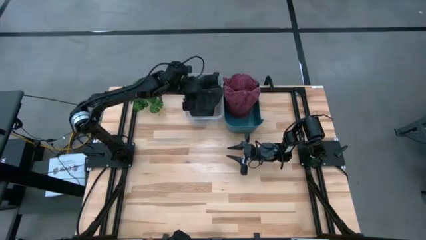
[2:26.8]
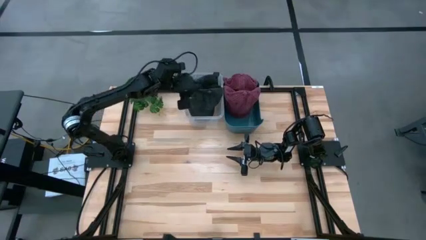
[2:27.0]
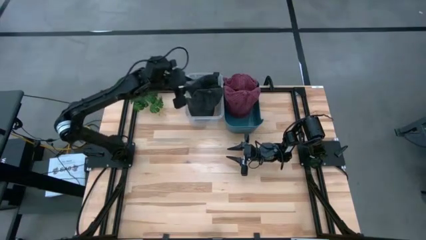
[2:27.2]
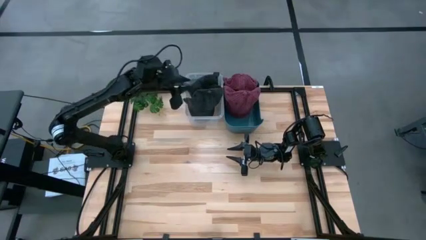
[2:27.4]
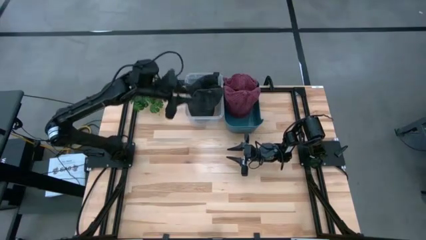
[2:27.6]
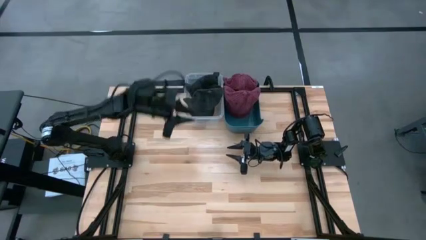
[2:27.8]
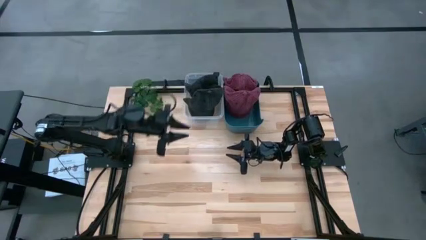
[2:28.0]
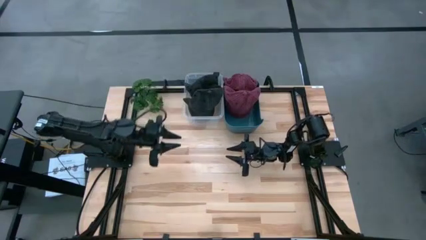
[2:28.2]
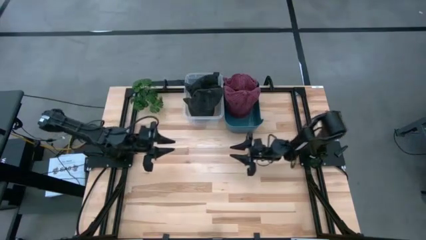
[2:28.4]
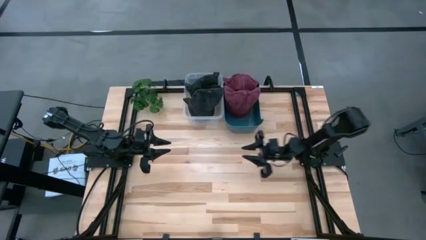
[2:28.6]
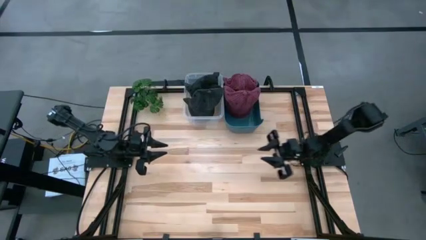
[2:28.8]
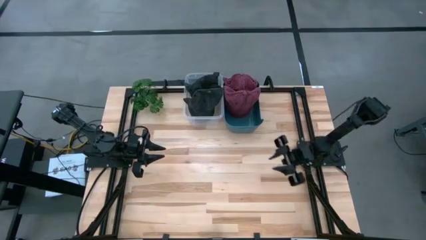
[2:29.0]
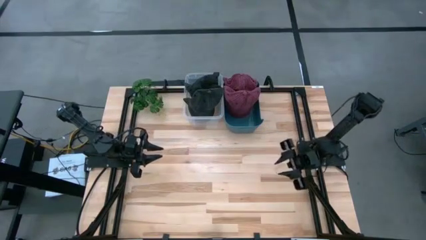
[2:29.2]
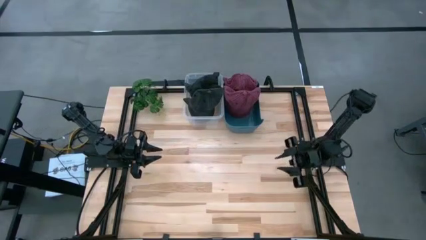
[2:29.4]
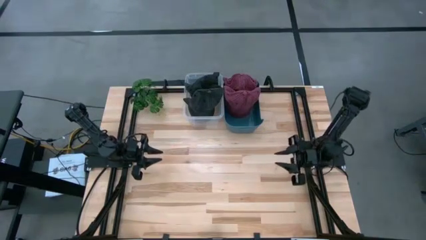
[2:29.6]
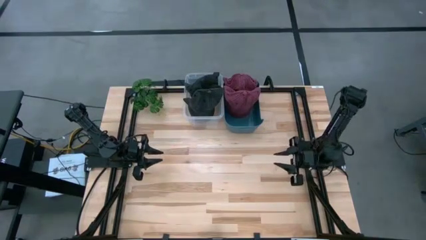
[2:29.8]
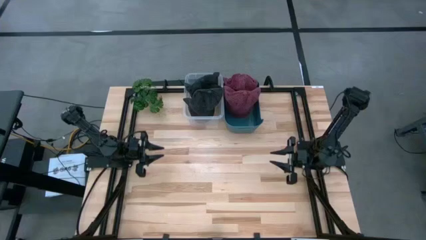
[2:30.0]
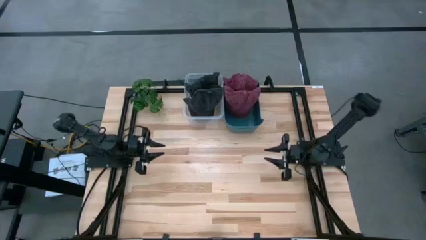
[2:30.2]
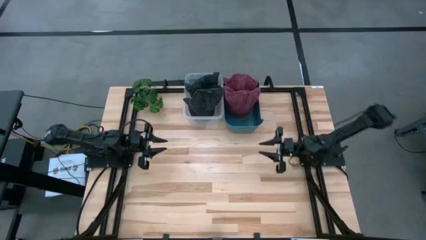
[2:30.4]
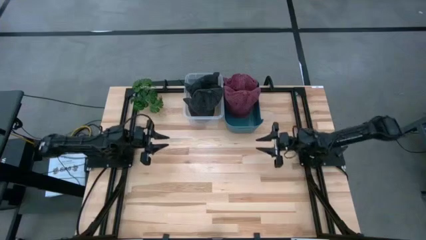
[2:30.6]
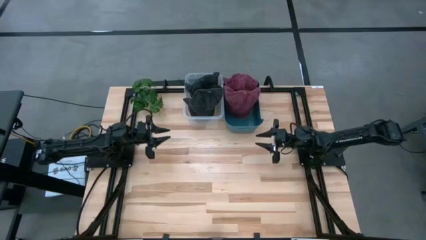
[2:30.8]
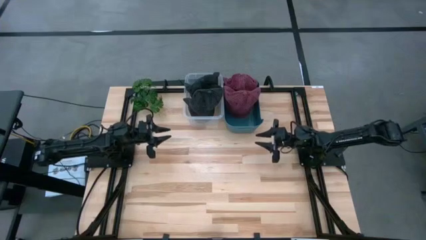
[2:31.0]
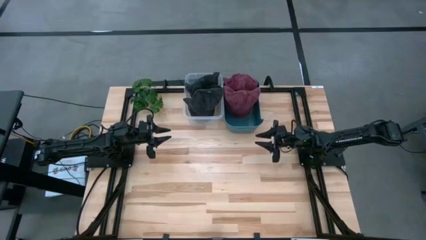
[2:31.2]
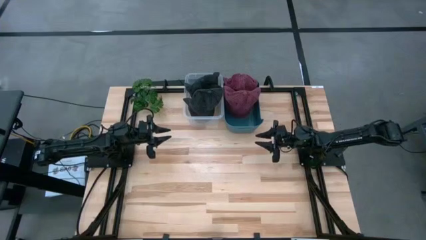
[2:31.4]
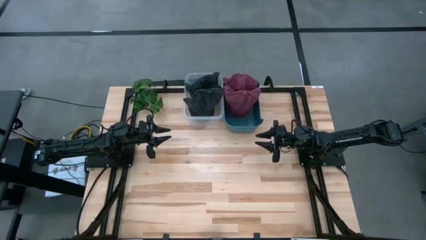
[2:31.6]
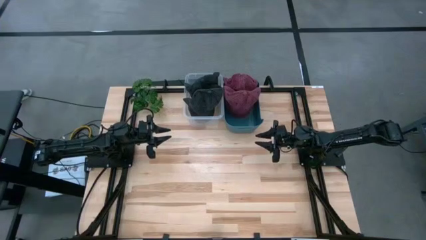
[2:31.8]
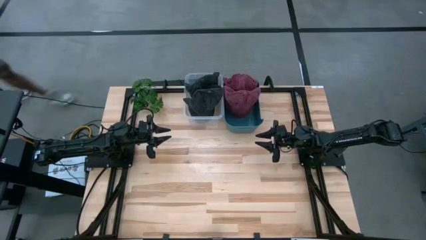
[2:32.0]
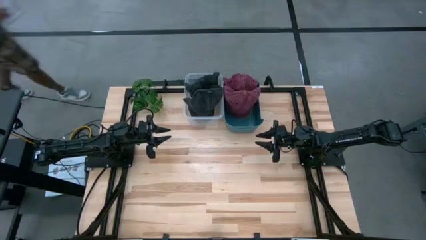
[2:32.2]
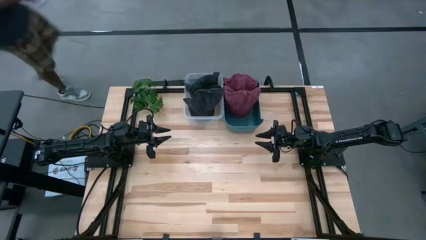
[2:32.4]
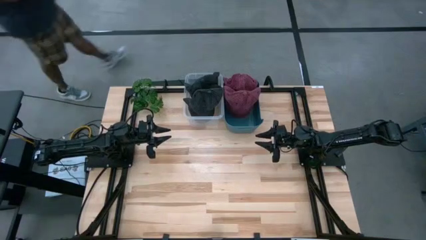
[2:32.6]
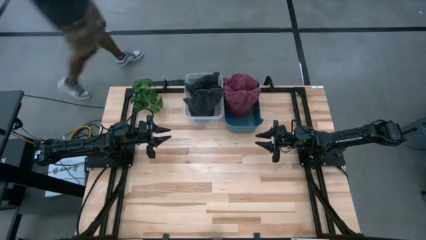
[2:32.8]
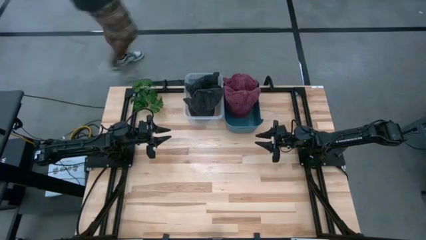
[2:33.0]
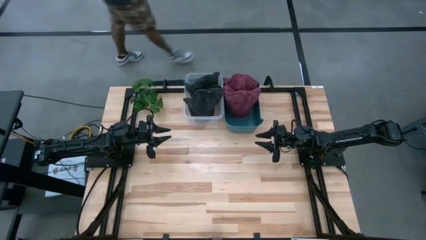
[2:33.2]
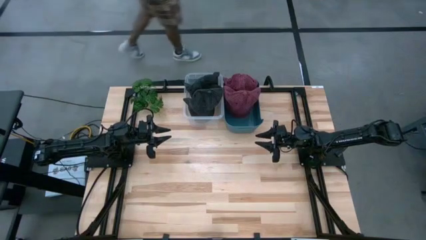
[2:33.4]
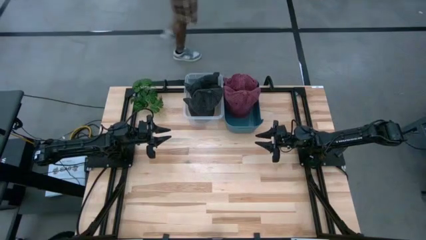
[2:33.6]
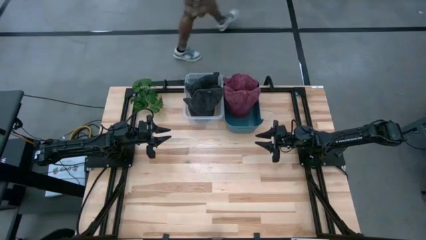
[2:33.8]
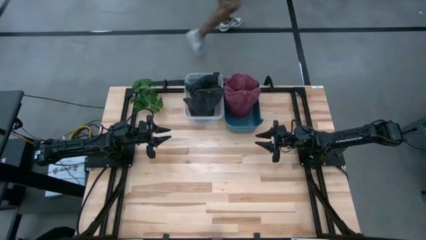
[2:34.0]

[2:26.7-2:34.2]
Task: Pick & Place hat
Return to Home Position

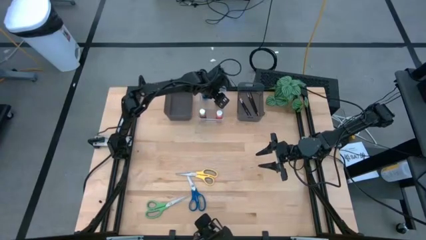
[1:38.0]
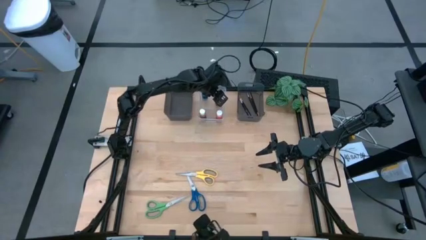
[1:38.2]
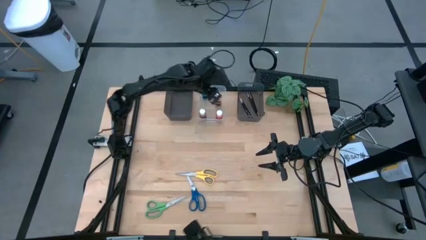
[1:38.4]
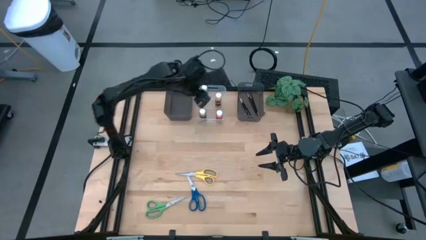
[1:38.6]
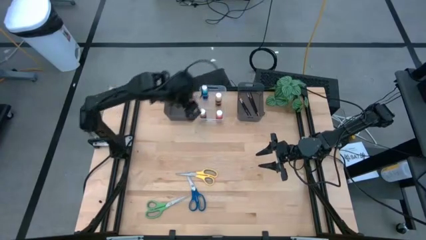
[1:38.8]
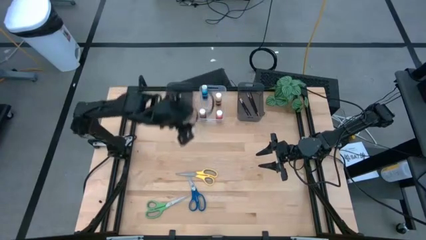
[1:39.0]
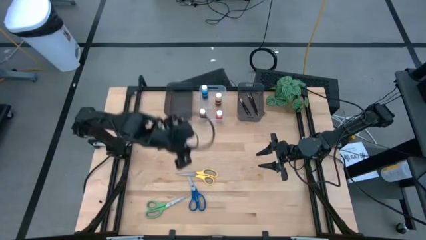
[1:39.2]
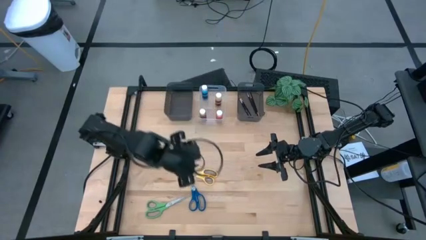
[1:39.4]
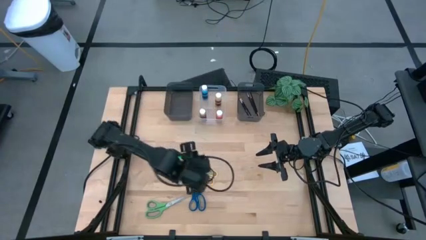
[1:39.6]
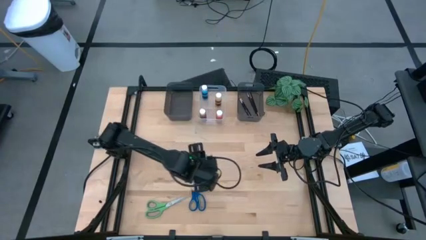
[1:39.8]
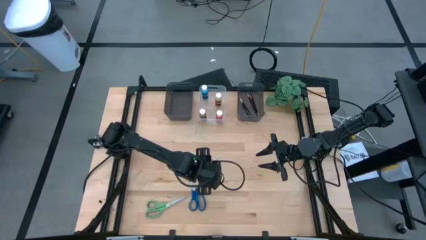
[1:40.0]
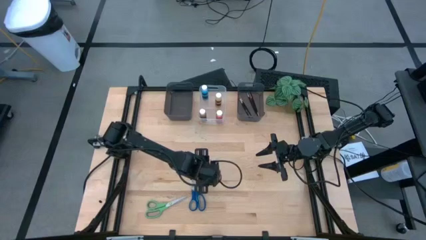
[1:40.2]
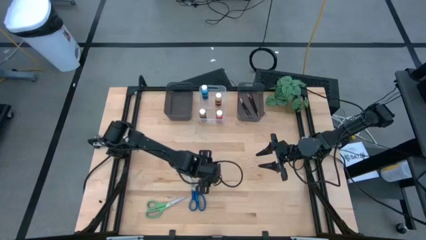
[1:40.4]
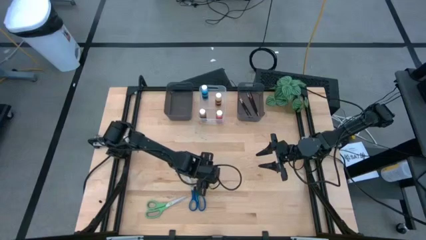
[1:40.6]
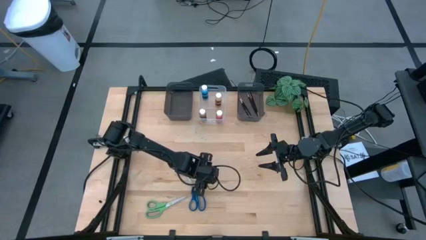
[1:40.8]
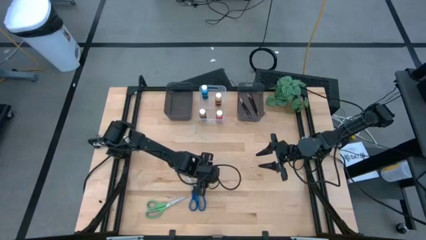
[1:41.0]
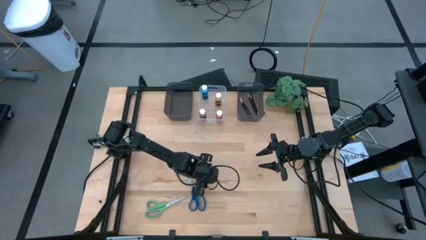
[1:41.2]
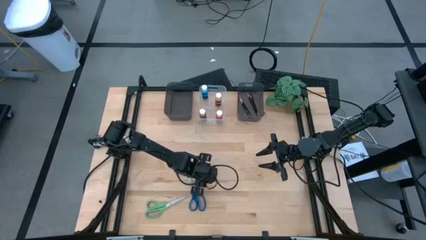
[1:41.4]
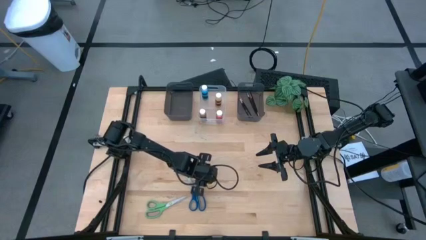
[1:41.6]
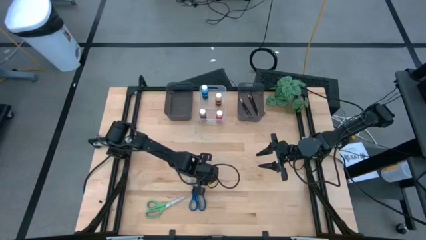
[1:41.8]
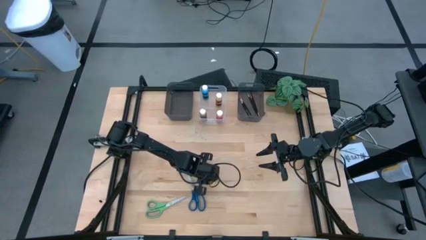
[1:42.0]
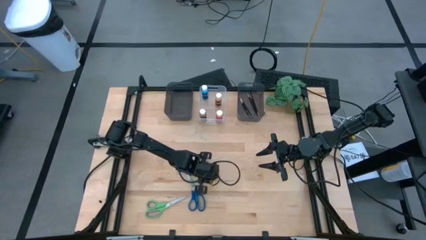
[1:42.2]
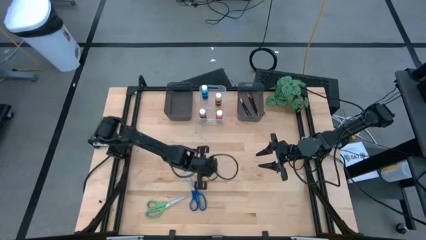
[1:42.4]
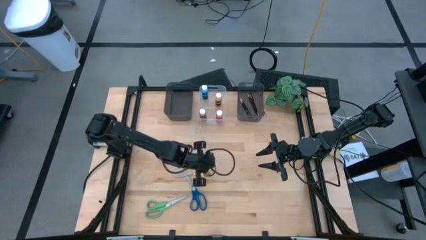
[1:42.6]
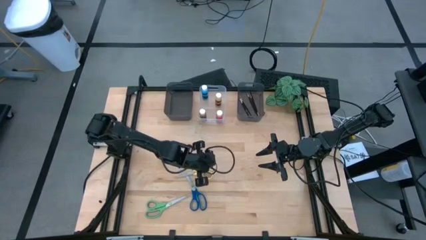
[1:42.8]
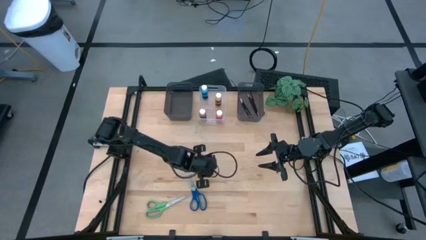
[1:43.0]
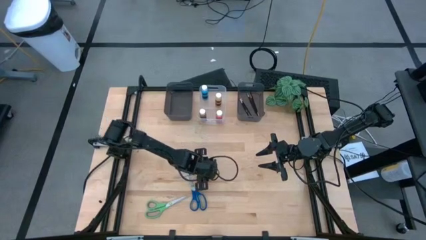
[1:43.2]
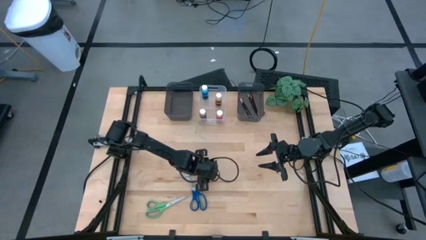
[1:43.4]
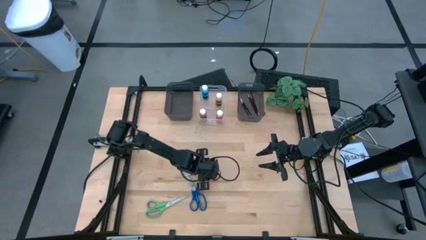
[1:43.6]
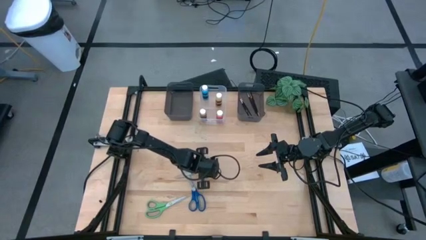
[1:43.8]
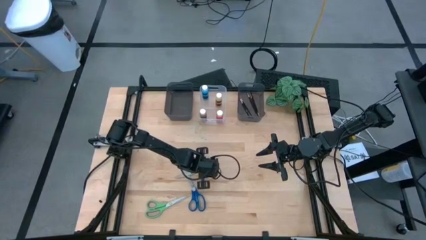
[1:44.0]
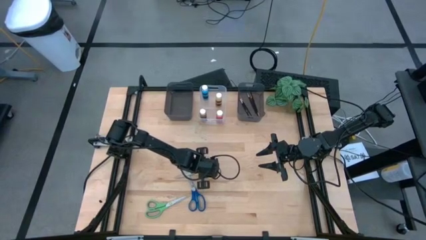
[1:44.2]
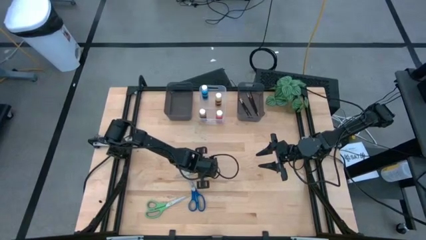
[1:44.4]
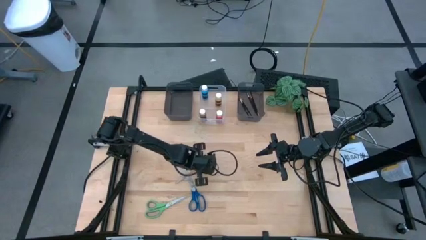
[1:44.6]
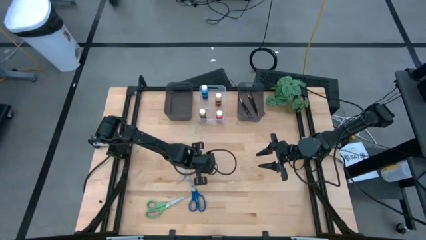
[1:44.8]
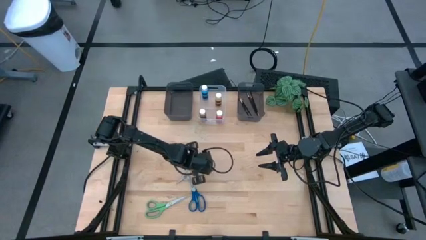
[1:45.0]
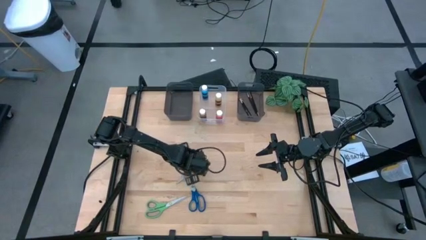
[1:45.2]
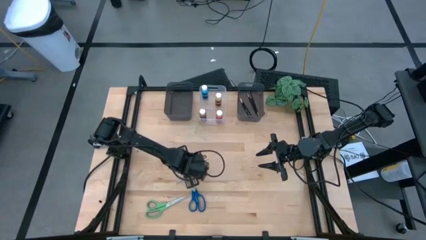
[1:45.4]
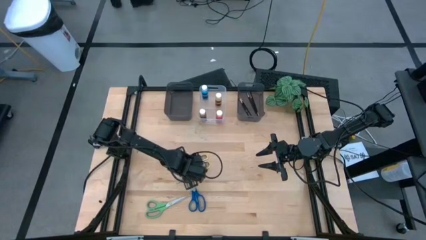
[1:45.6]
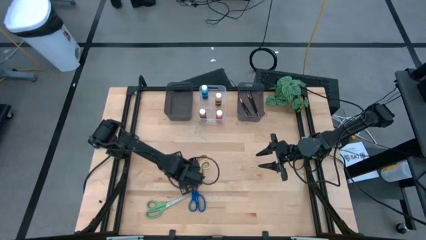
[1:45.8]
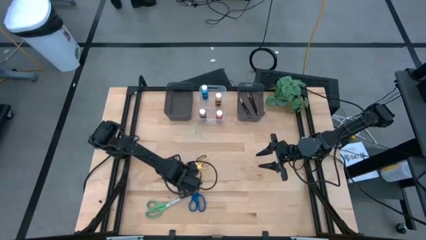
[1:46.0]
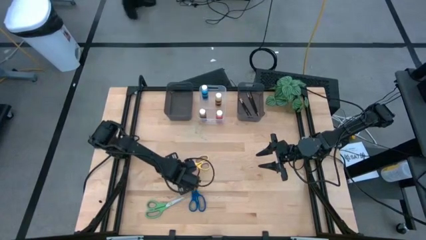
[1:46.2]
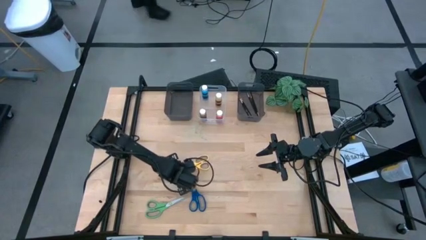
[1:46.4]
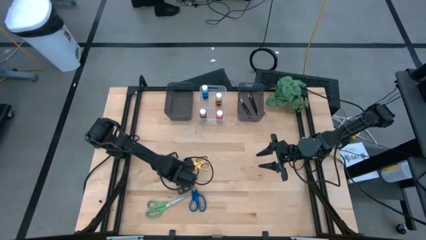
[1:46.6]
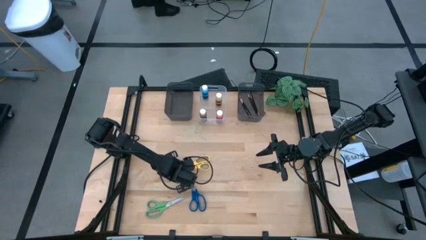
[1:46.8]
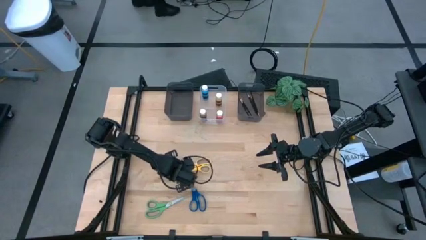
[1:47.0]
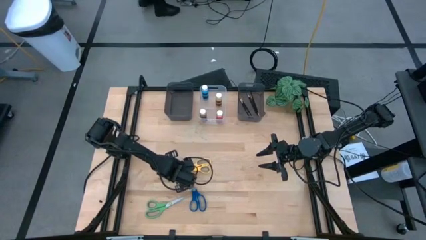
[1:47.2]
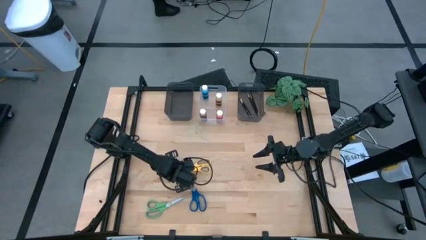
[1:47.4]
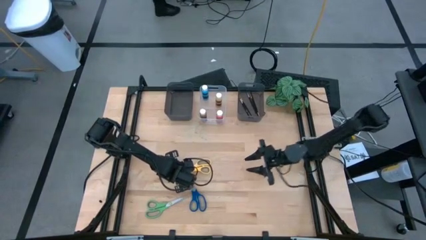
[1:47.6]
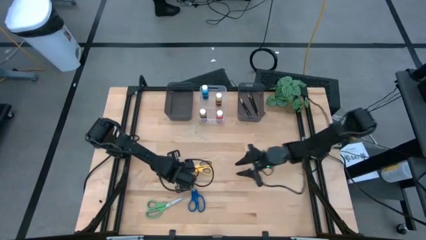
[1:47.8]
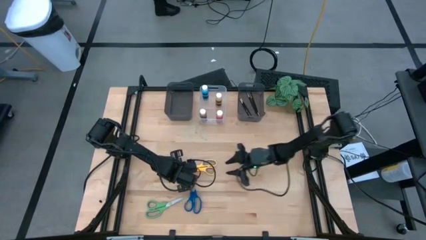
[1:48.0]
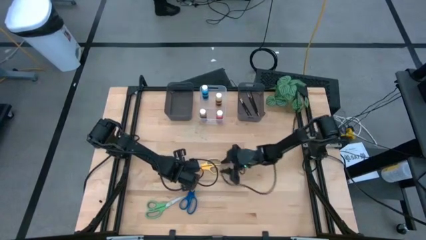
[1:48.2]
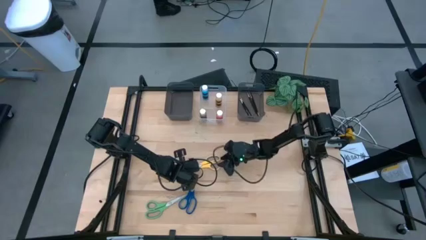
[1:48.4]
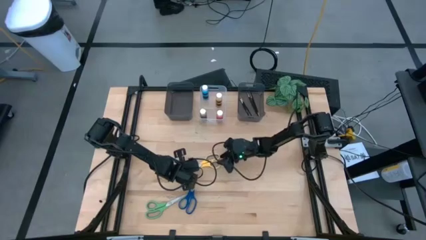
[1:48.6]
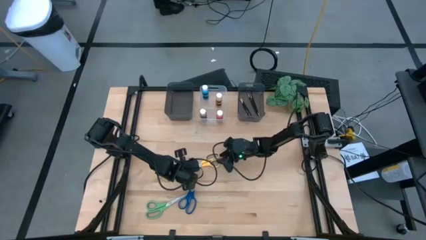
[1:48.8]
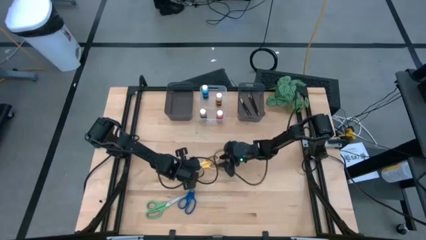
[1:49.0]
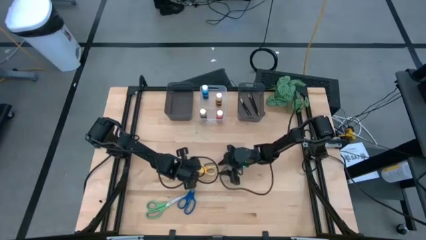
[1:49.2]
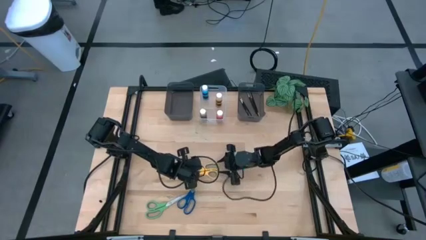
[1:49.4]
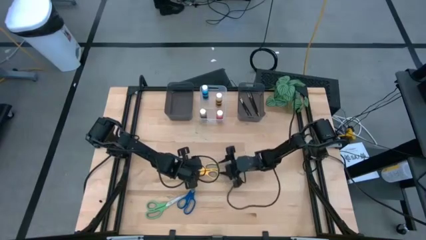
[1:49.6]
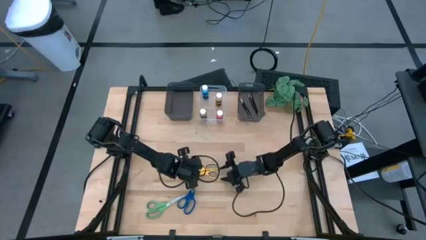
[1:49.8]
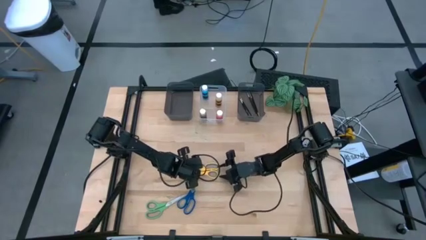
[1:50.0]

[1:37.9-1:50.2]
Task: Pick & Place Paint Supplies
Put the yellow scissors into the left black bin
